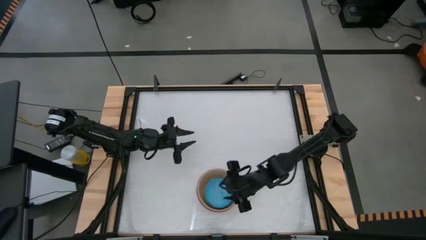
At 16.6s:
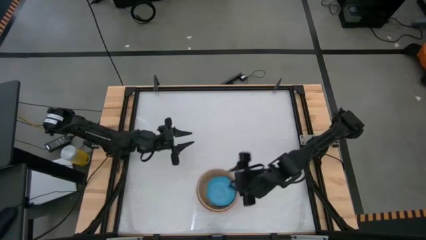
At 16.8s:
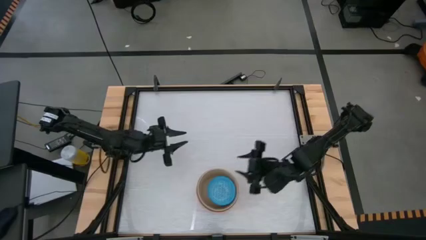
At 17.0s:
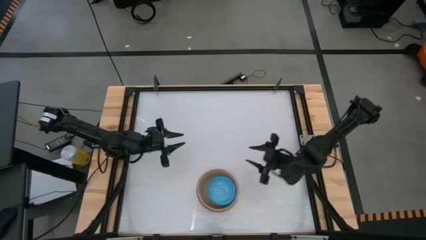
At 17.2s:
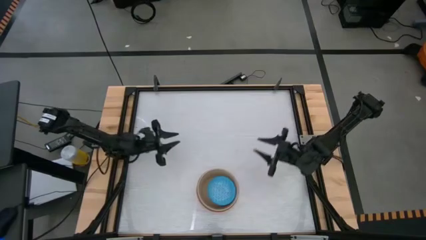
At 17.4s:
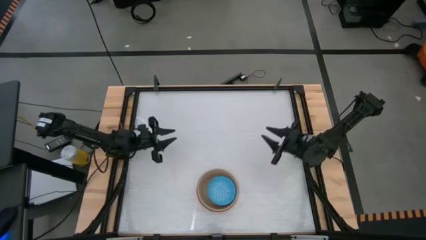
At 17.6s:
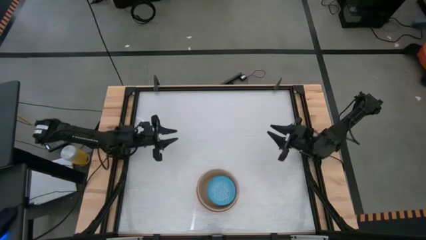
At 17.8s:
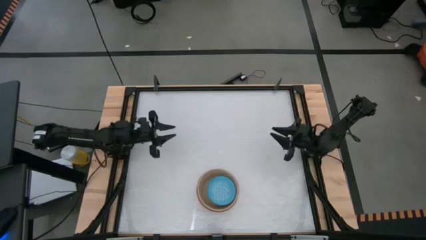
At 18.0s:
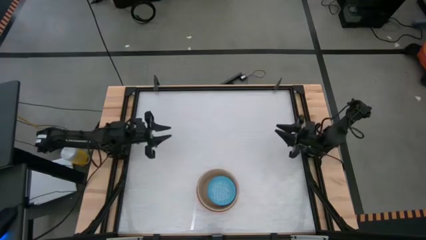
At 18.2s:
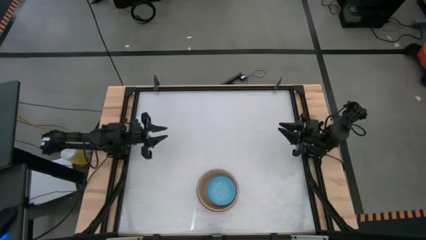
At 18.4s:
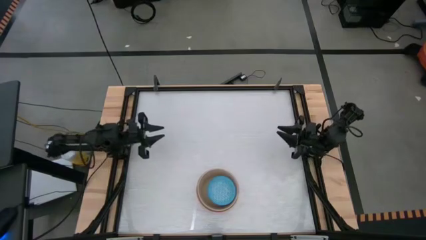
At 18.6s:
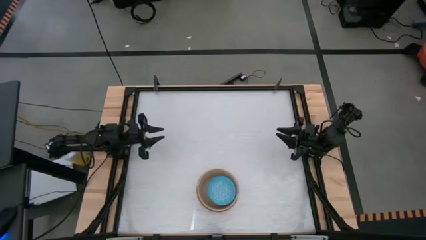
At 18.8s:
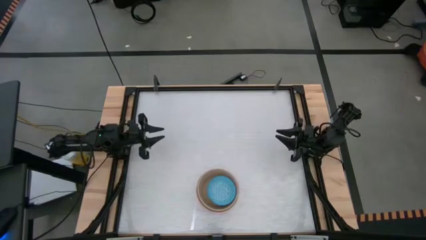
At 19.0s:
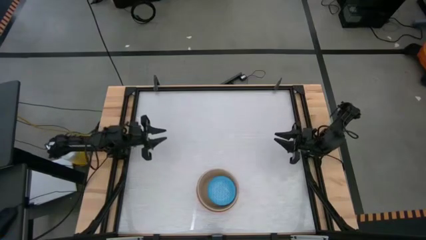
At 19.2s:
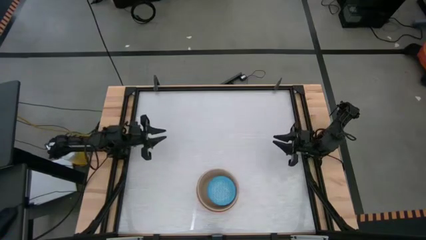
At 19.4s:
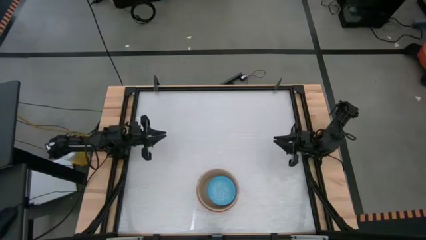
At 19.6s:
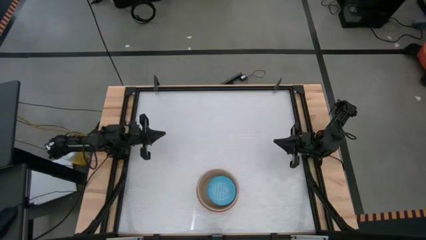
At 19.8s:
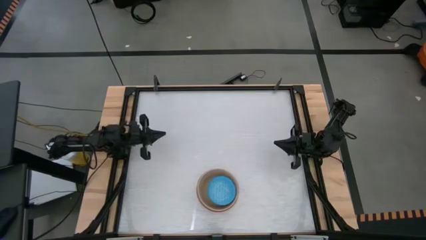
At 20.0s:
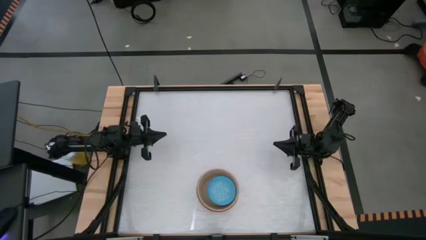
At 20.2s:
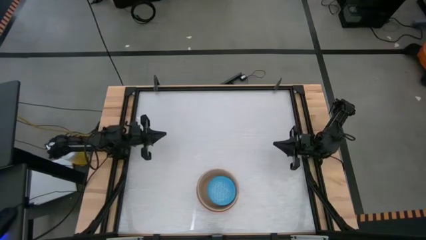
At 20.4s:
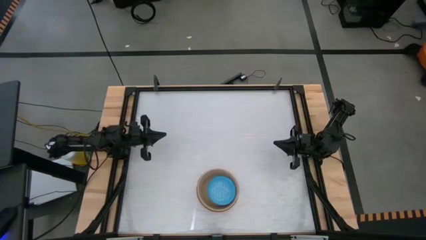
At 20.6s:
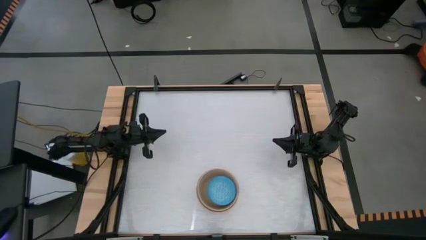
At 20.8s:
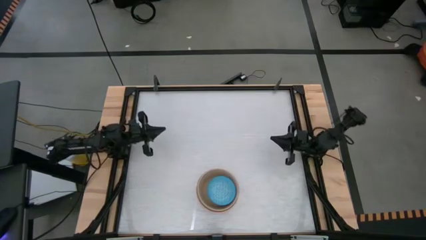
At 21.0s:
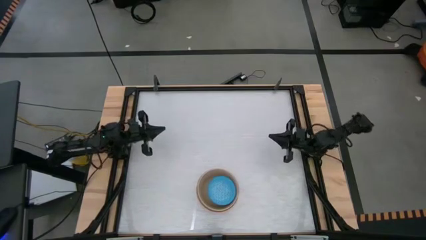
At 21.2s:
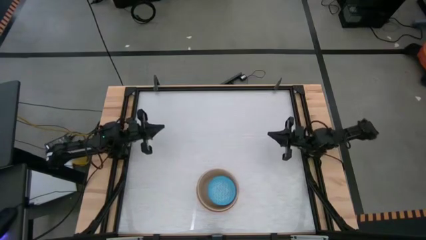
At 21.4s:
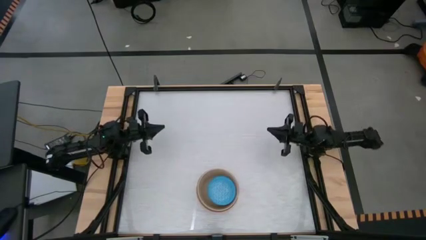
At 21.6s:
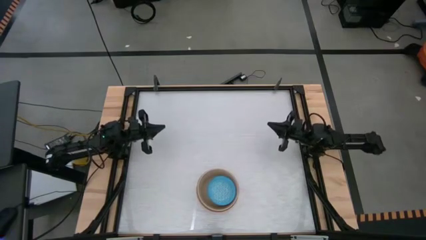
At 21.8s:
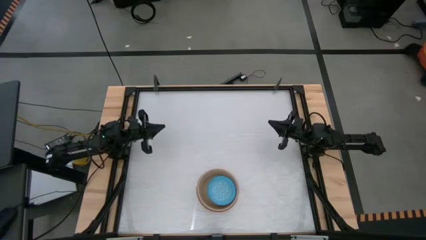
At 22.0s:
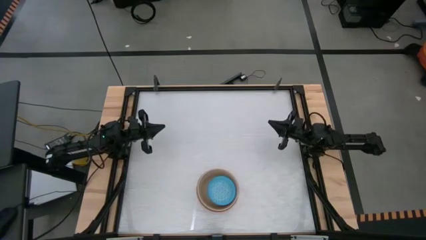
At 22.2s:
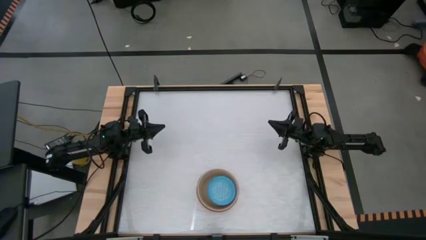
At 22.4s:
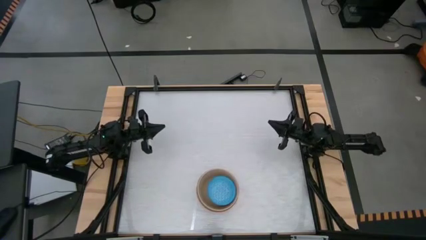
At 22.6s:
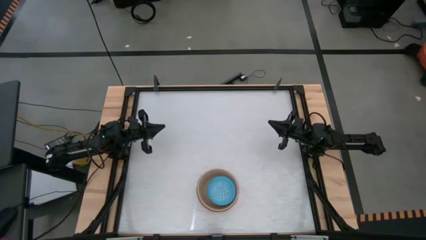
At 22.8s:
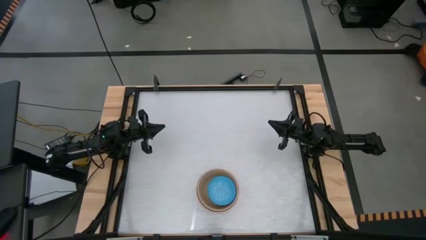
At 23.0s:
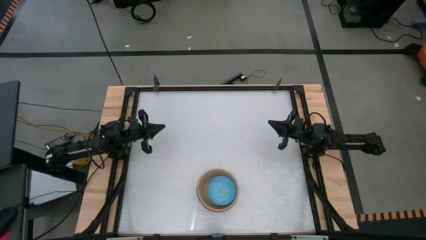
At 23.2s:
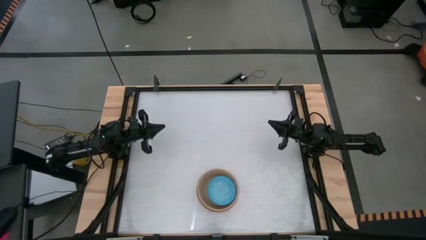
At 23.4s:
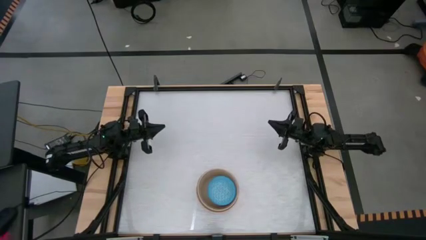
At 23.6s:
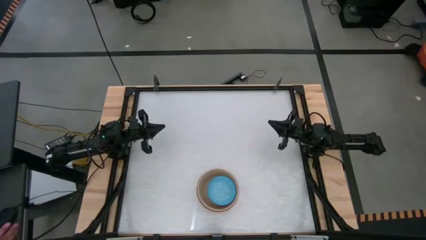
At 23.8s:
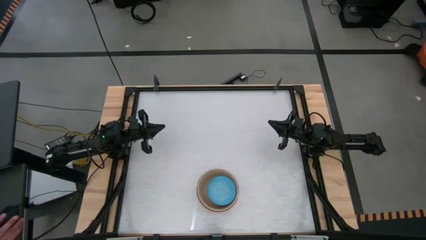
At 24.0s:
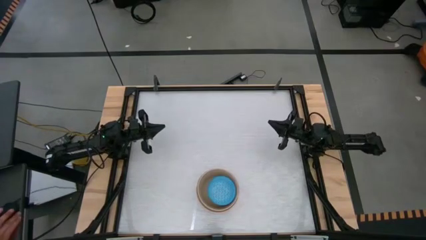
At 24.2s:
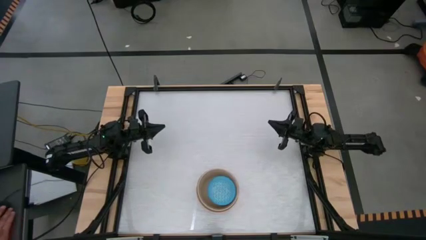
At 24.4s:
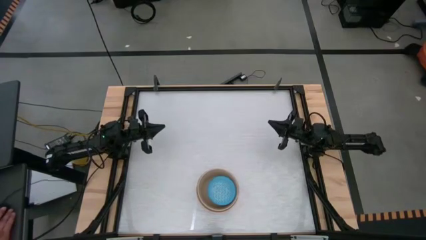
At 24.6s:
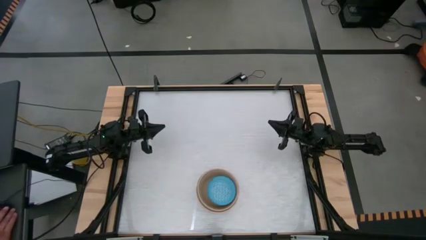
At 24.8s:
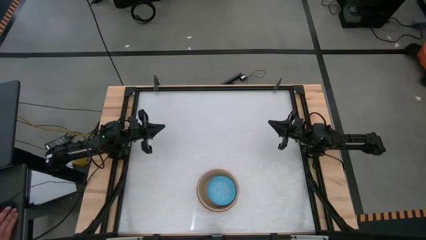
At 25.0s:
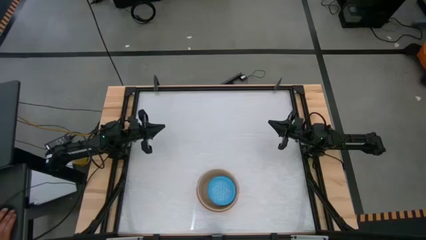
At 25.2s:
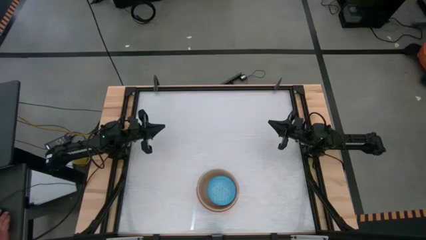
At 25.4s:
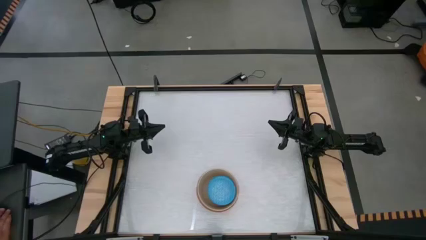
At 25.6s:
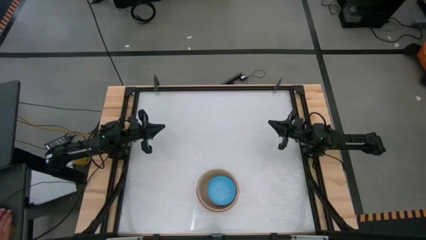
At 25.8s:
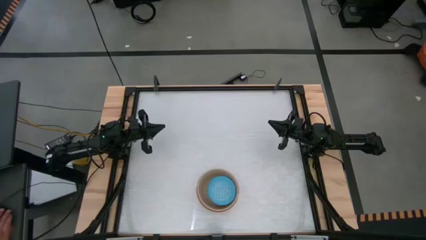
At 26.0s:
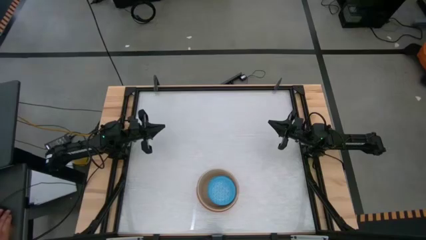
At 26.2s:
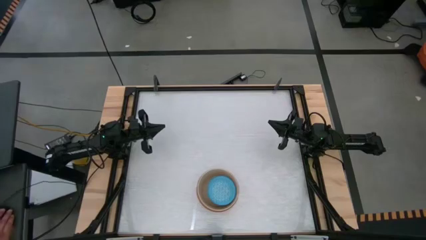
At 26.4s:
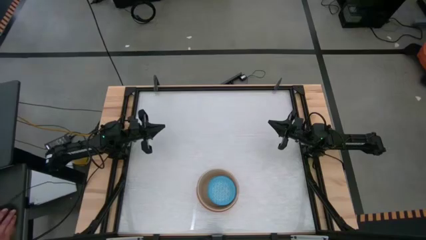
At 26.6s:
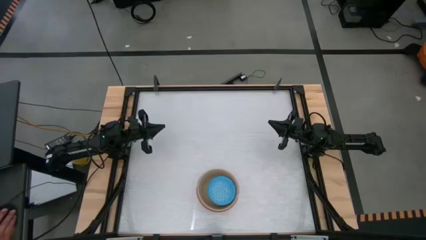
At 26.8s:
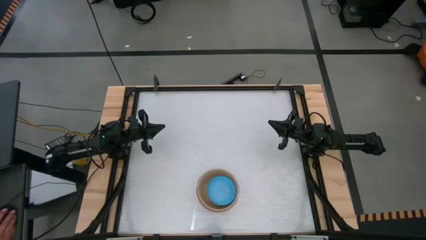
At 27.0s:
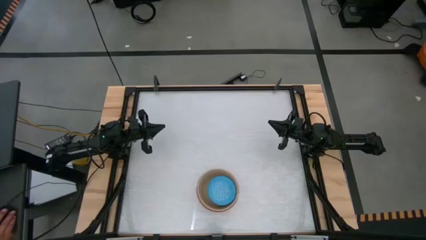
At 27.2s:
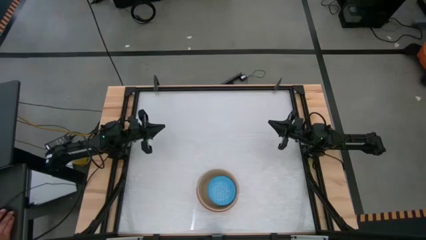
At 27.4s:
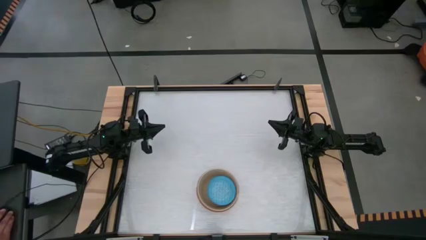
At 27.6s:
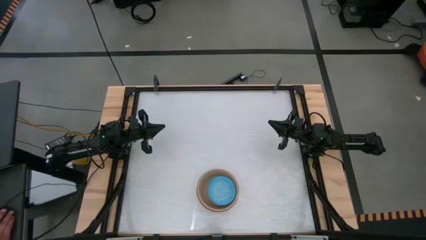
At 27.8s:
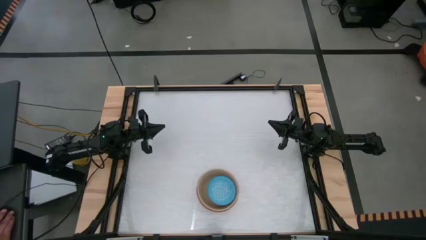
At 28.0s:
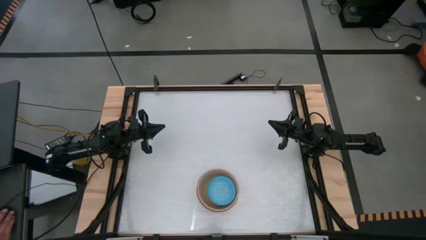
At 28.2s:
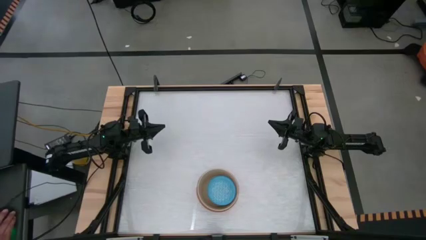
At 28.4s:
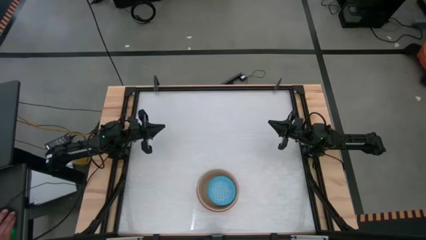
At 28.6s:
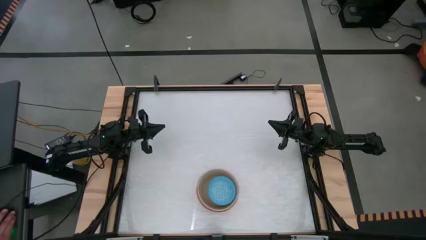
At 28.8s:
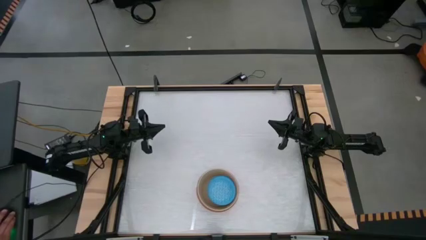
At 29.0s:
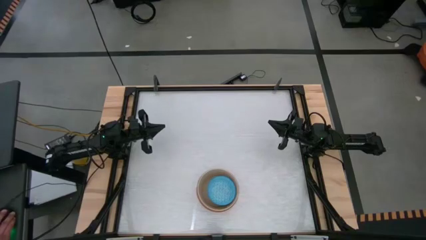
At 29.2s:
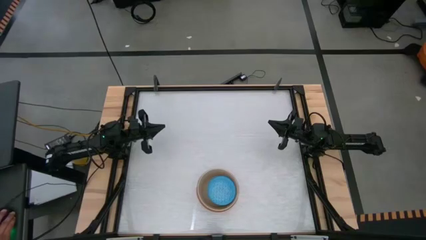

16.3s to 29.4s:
Return to Home Position

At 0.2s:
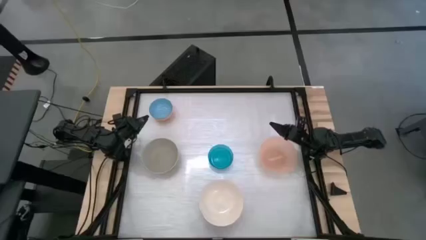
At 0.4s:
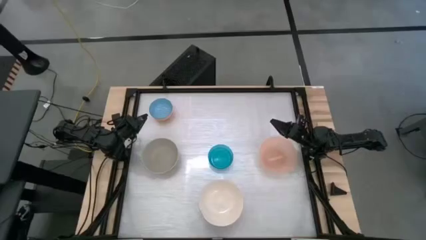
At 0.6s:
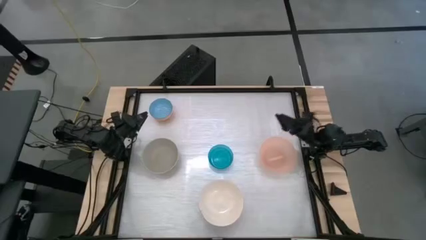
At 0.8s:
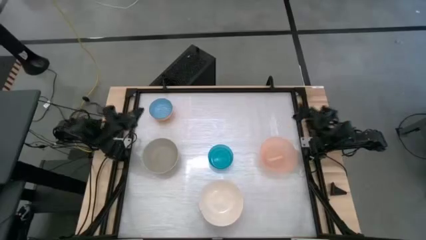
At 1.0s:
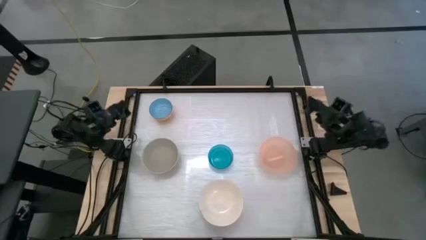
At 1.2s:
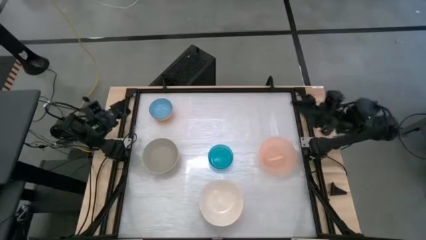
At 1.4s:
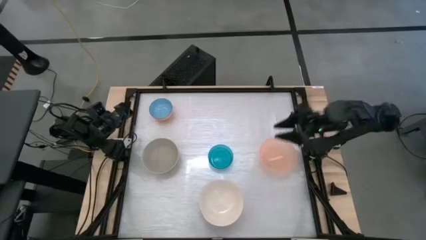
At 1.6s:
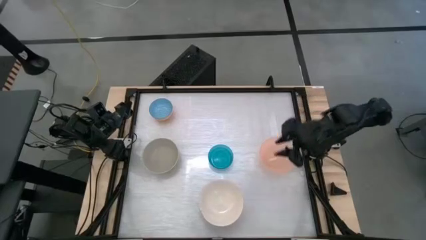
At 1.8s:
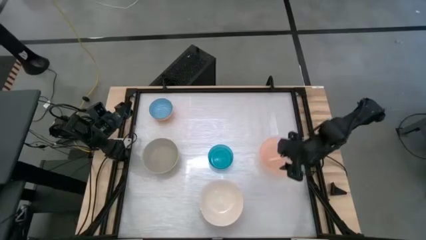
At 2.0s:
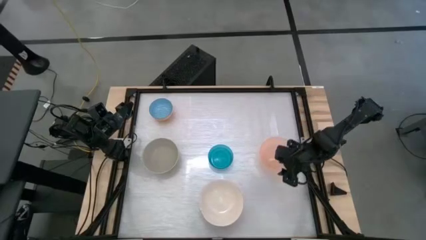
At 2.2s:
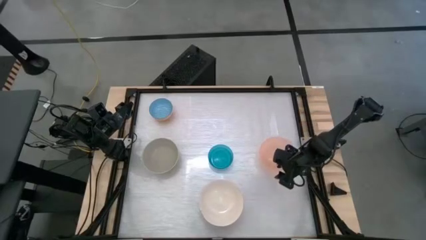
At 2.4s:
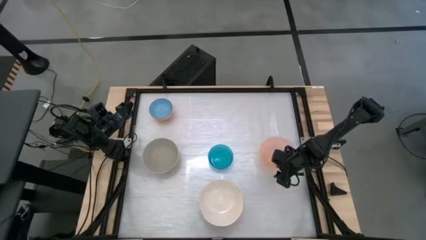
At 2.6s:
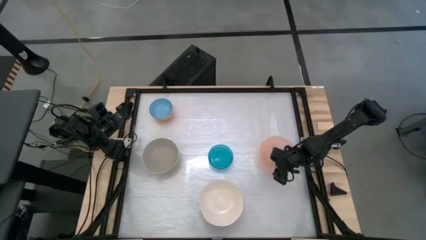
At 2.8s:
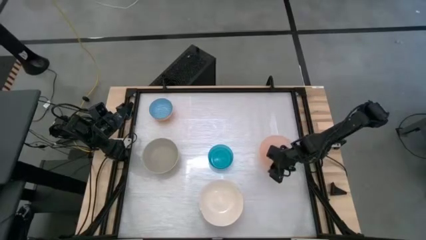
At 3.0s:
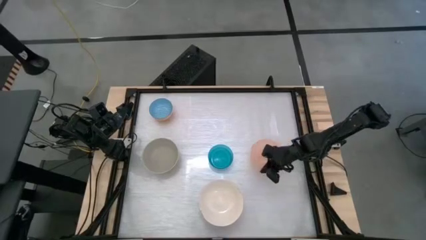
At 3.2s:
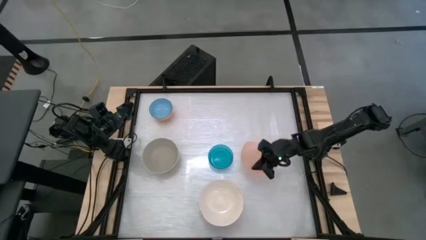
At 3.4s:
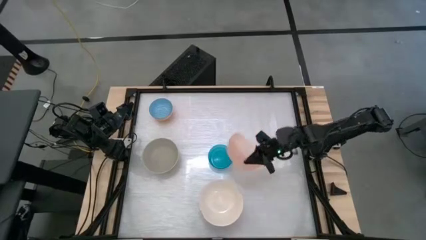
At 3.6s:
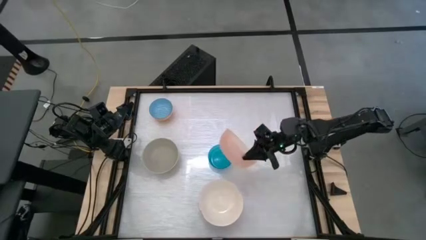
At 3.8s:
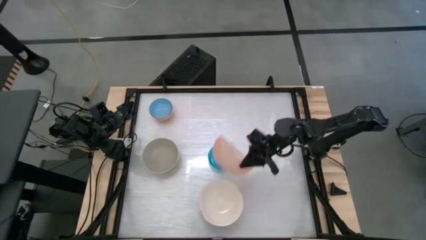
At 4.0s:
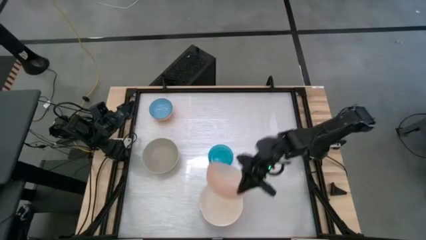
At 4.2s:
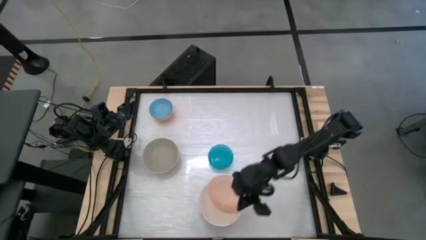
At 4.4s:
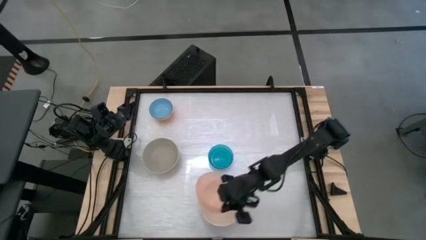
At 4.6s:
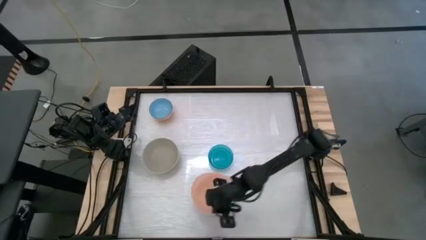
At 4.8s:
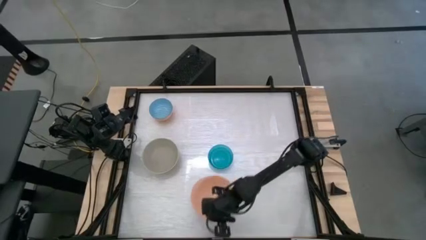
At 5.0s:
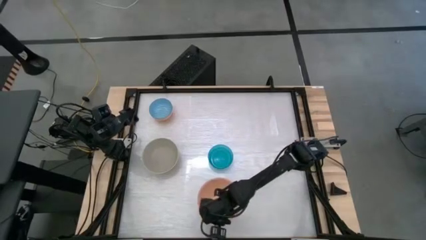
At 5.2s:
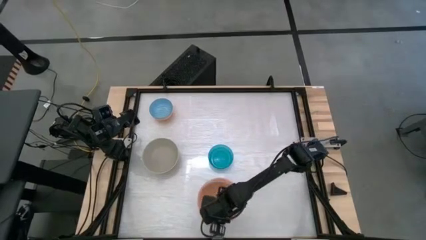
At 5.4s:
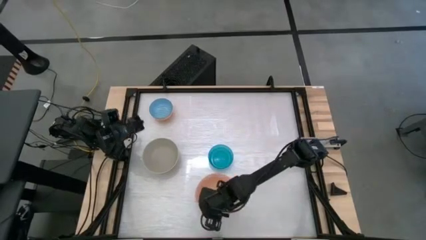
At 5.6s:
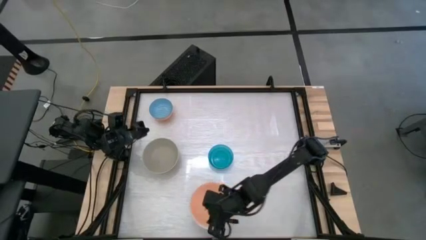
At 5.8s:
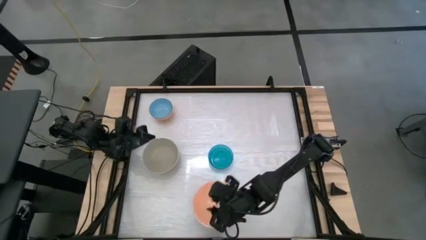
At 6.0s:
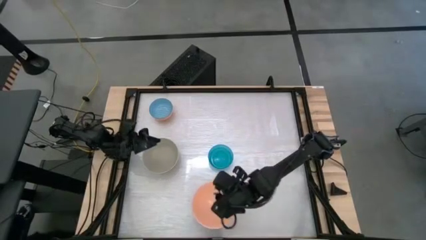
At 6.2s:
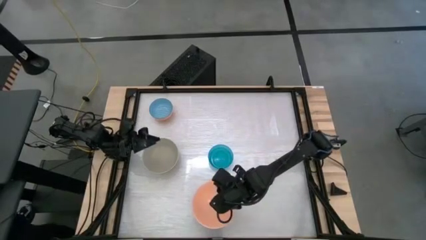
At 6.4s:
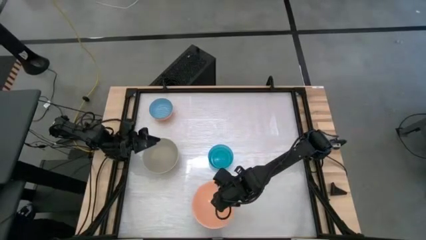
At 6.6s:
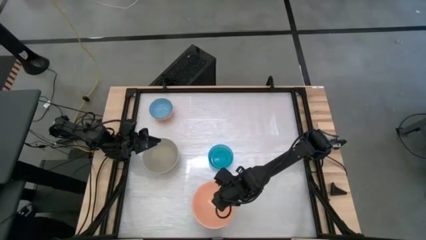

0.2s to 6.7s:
Stack the light orange bowl on top of the white bowl
